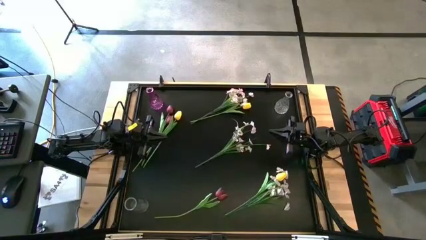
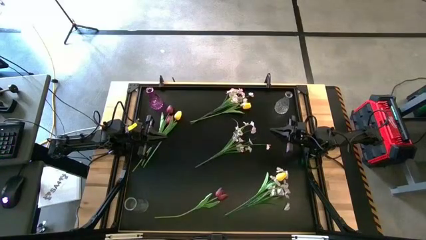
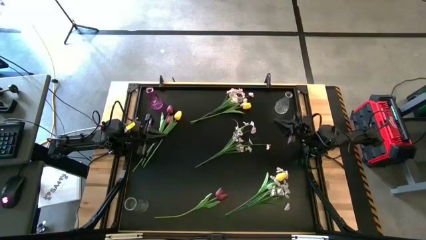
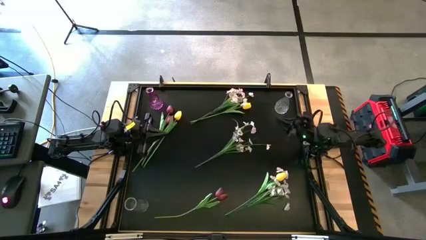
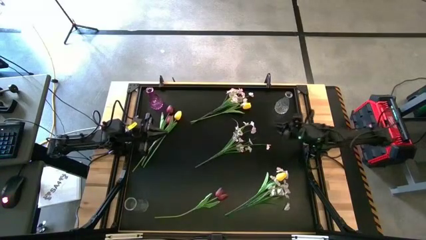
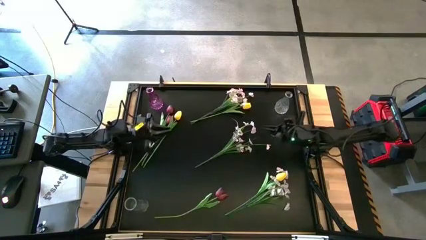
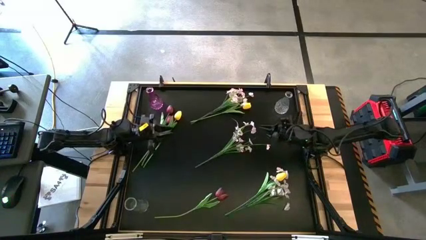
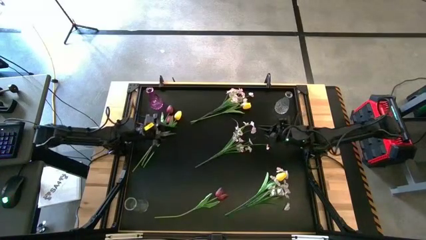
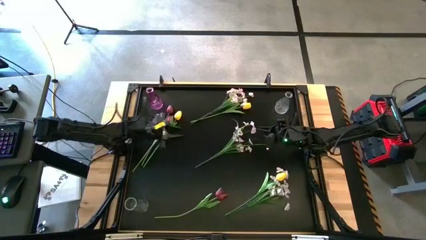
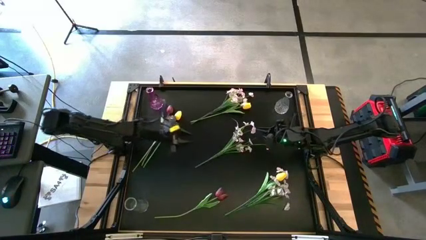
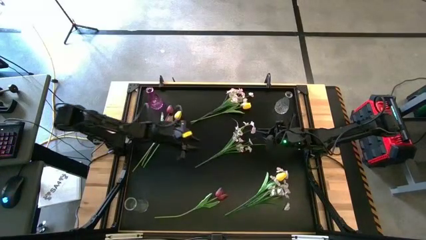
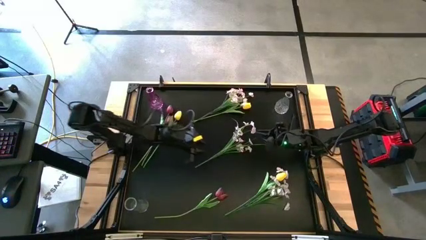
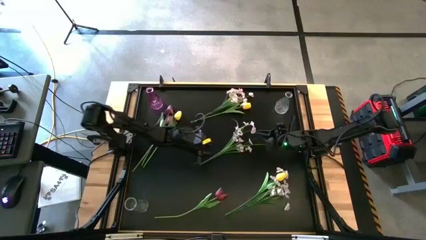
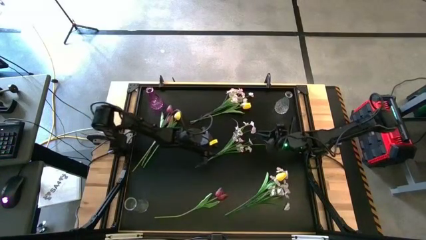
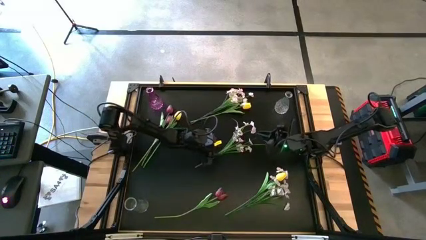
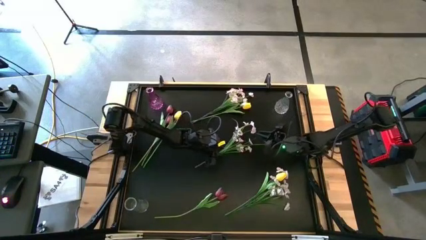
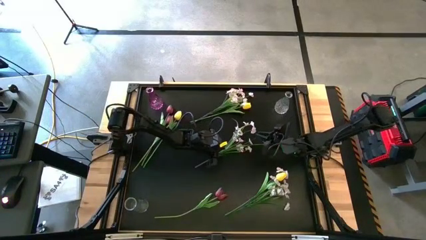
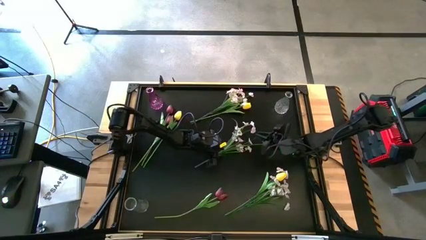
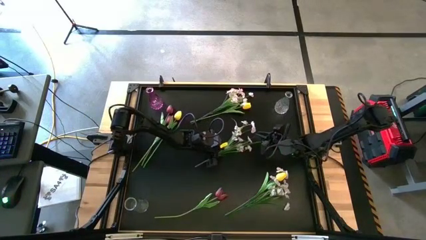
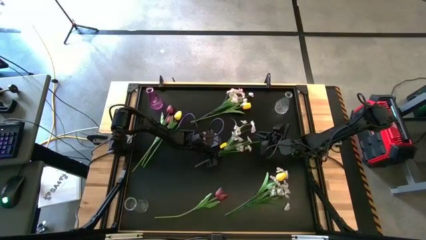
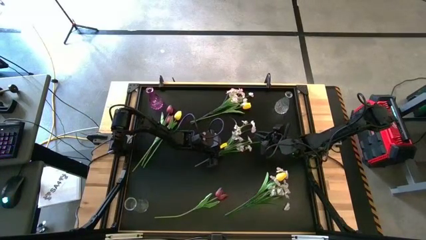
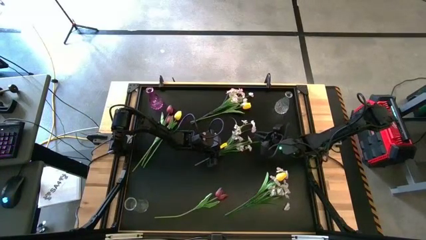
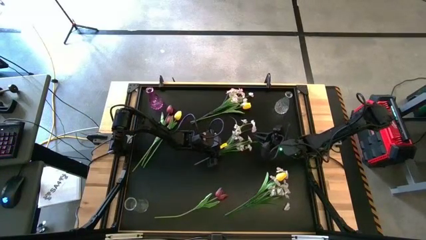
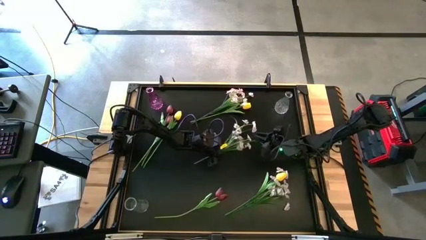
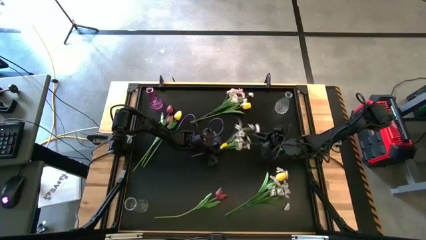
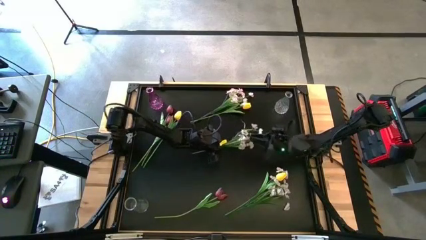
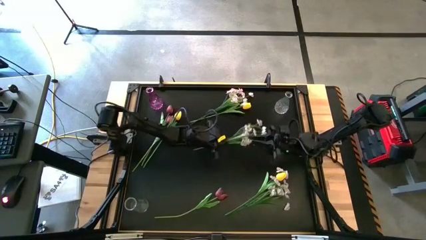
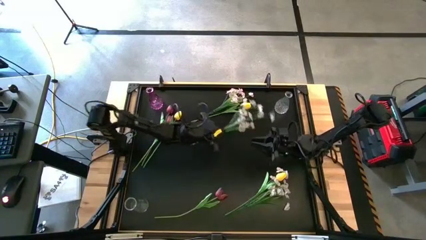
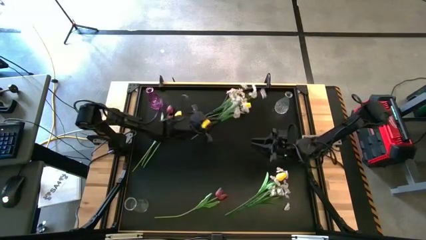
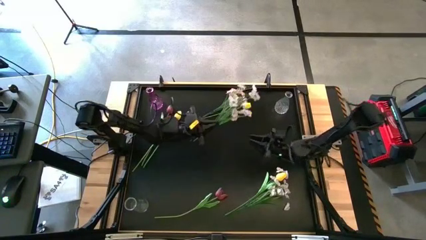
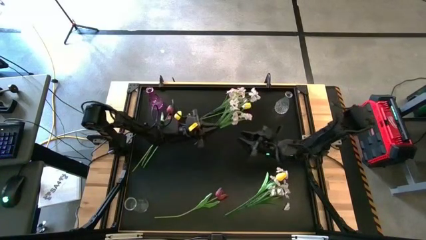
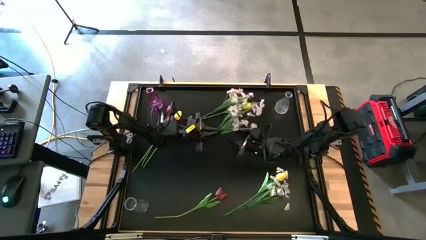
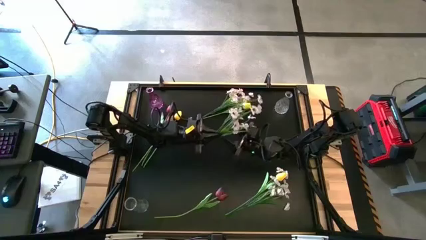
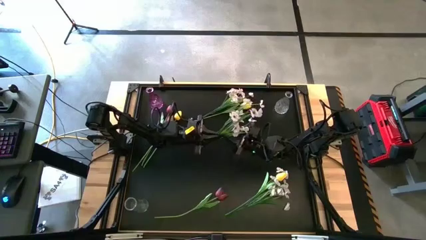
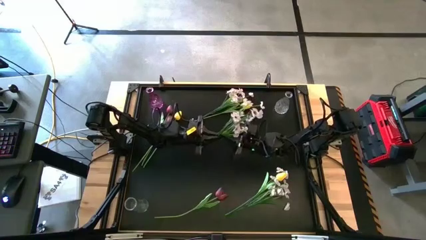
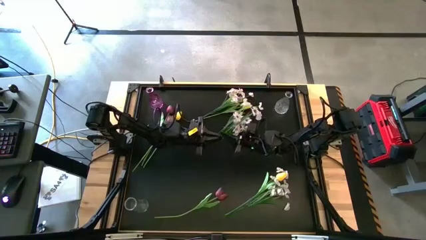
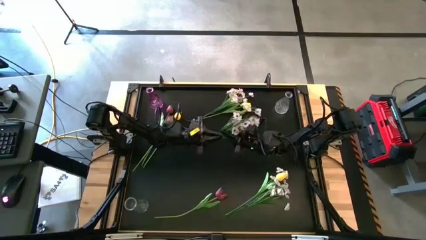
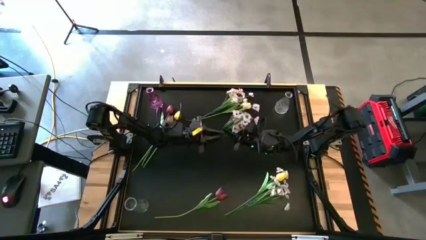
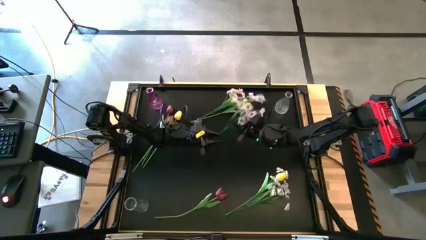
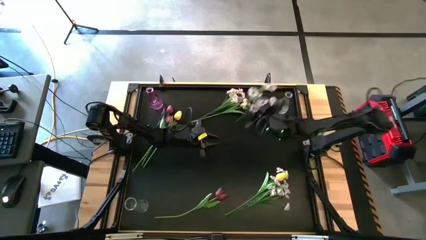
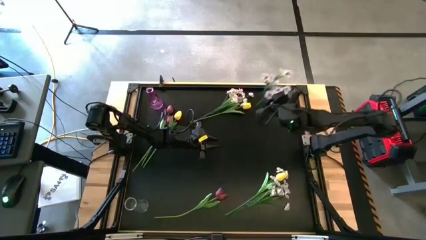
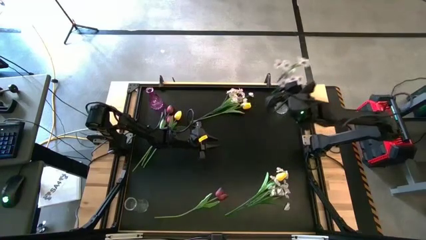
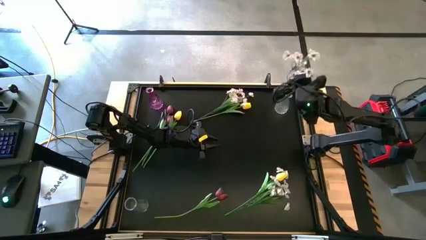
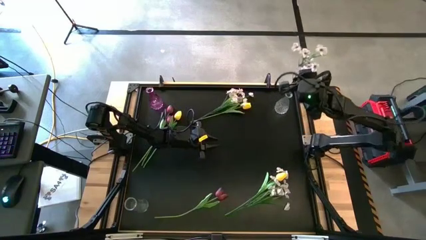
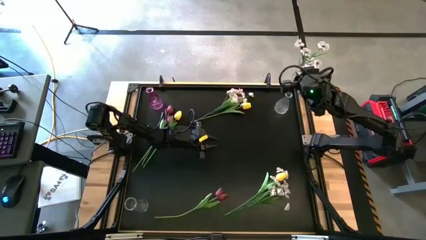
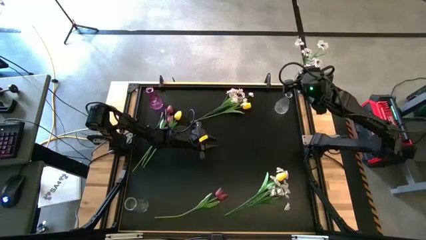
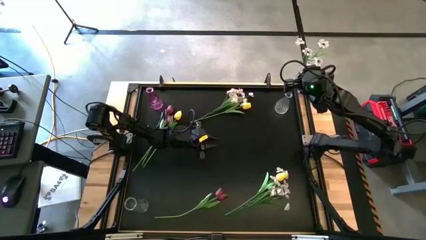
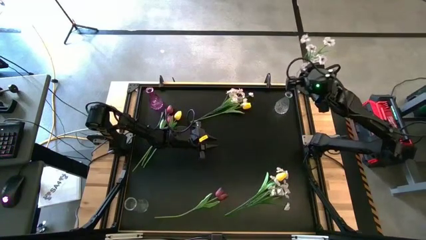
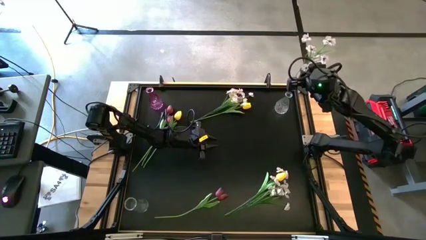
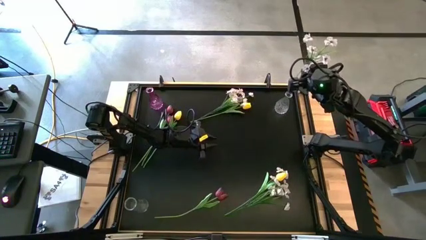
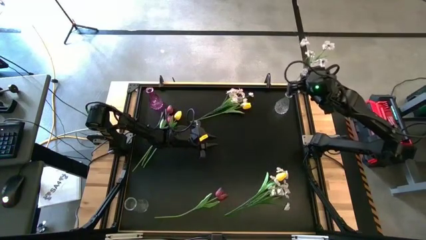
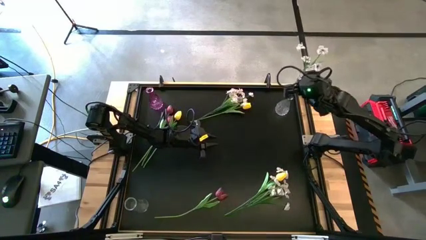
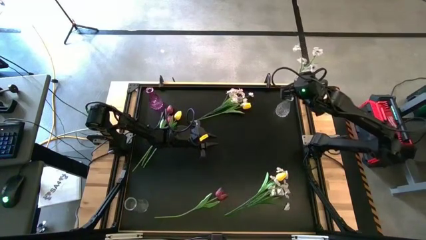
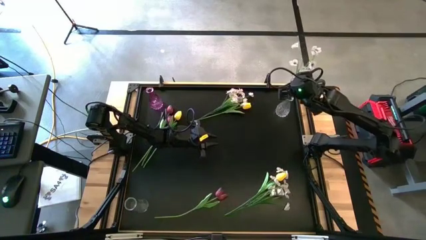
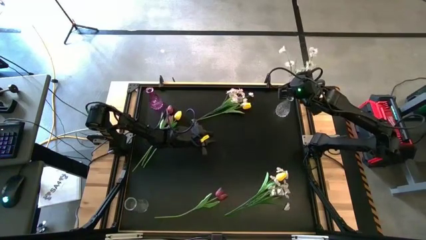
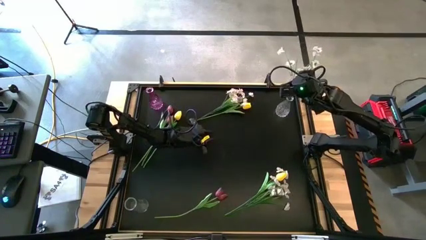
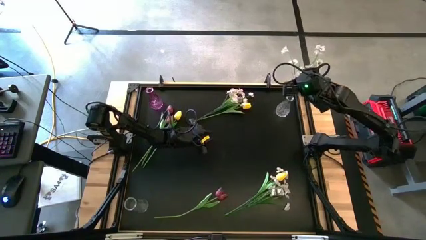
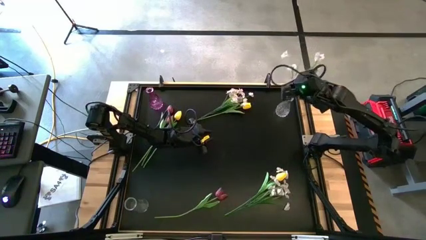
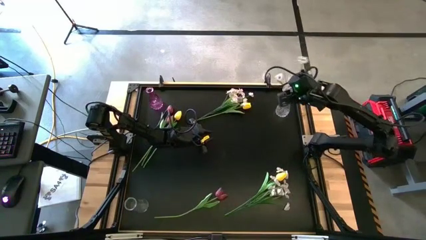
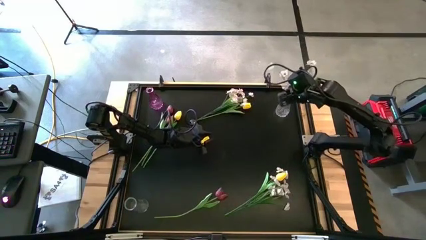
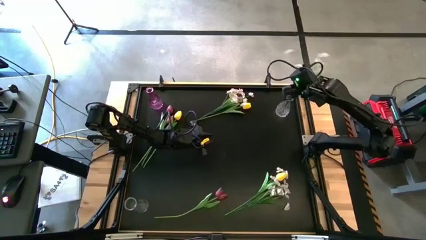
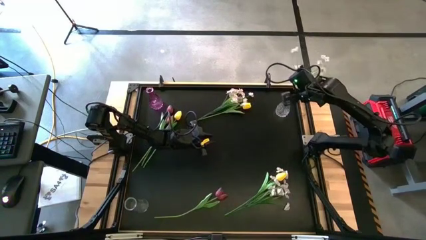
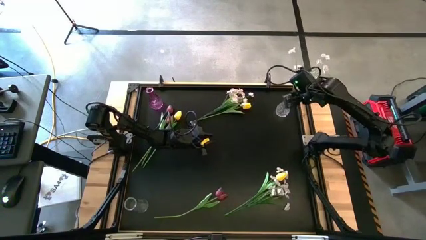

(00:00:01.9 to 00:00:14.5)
Task: Sort flowers into vase by color
Put the middle white flowers into the top transparent vase
